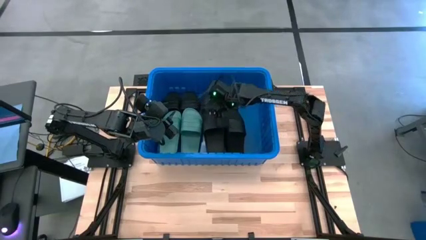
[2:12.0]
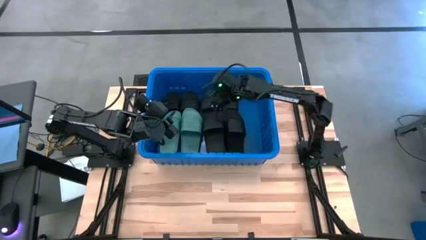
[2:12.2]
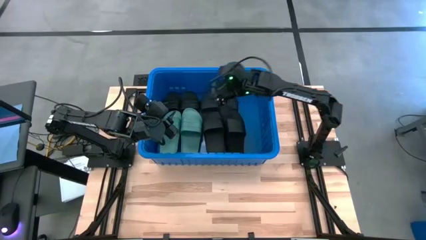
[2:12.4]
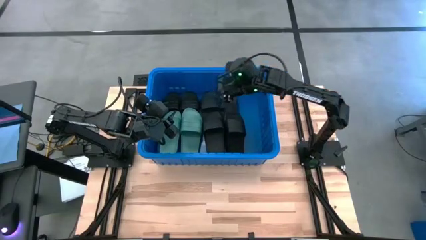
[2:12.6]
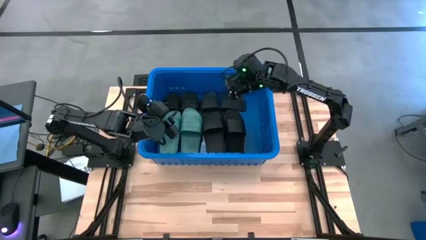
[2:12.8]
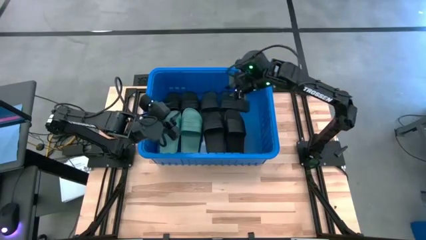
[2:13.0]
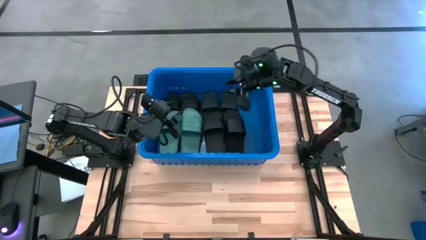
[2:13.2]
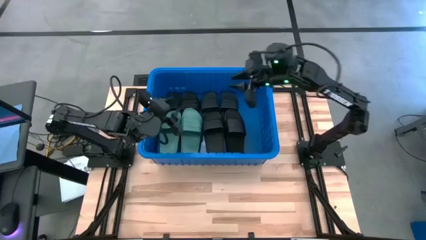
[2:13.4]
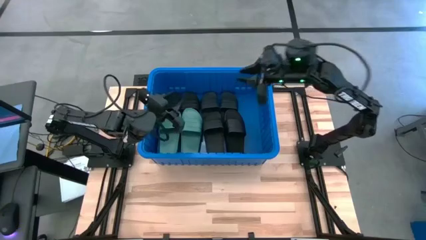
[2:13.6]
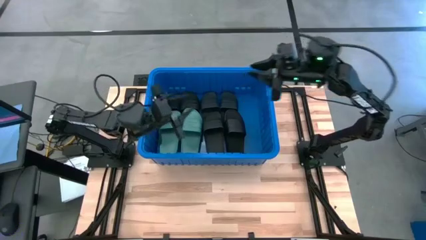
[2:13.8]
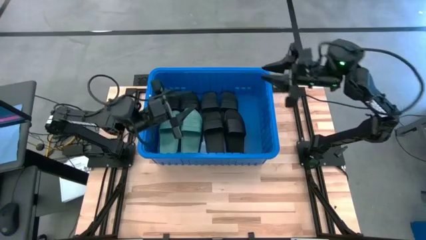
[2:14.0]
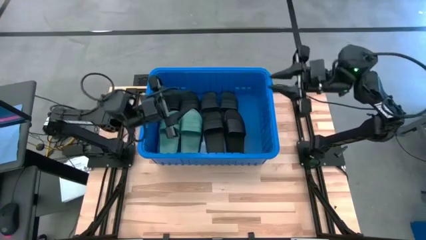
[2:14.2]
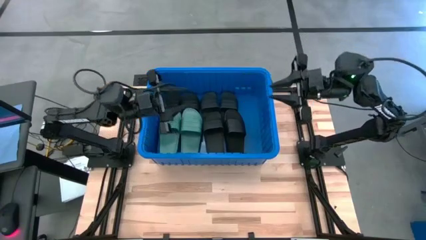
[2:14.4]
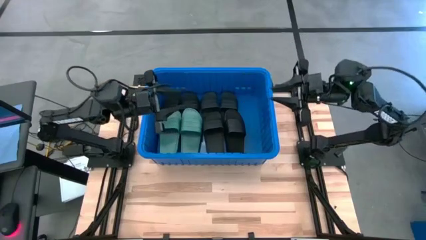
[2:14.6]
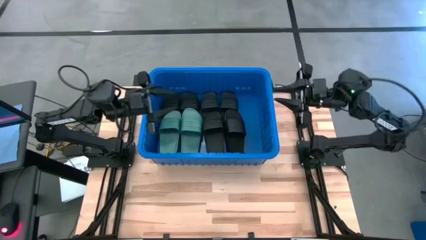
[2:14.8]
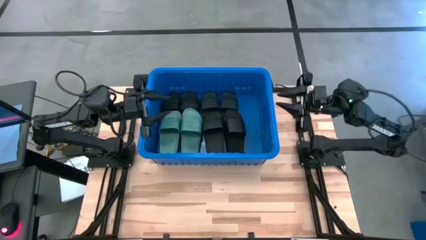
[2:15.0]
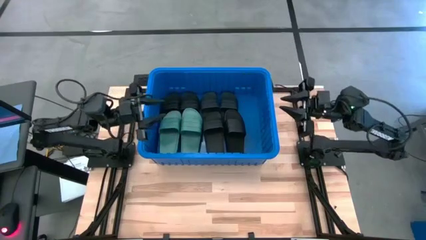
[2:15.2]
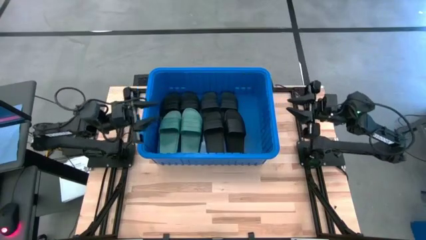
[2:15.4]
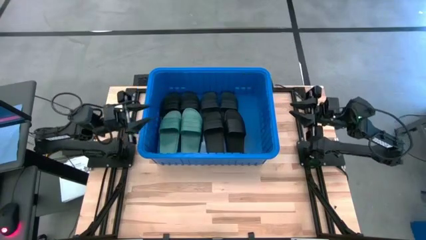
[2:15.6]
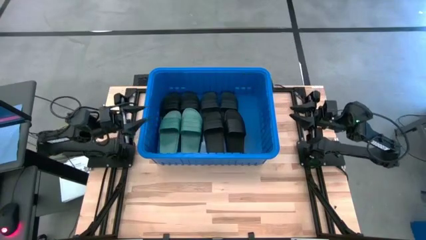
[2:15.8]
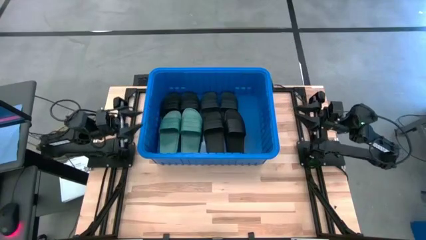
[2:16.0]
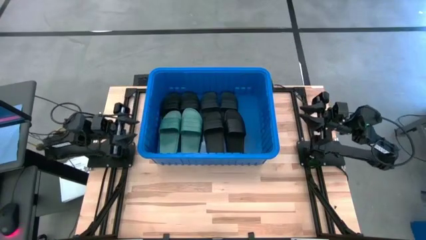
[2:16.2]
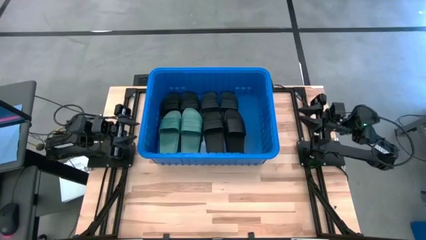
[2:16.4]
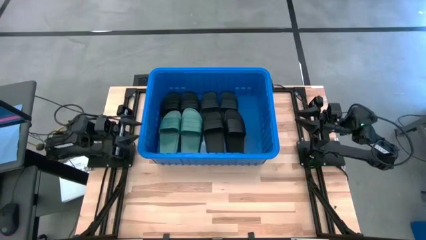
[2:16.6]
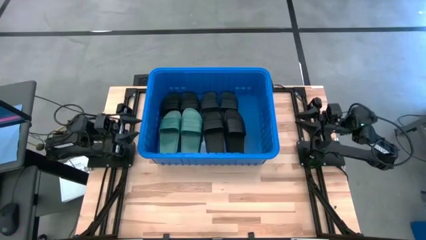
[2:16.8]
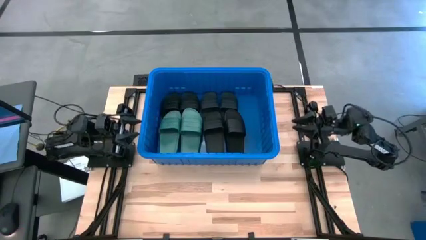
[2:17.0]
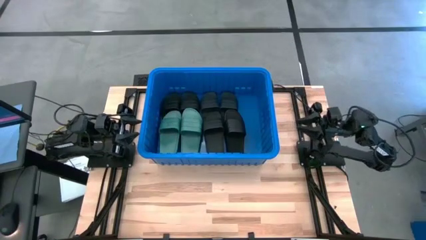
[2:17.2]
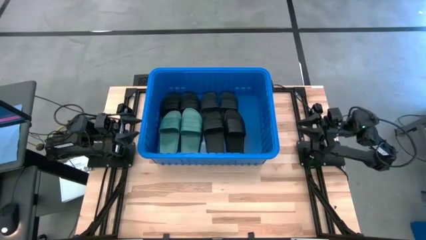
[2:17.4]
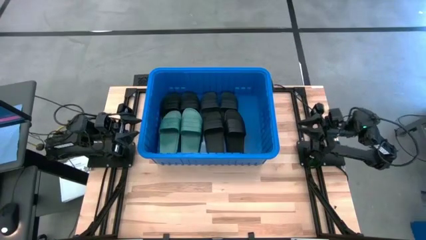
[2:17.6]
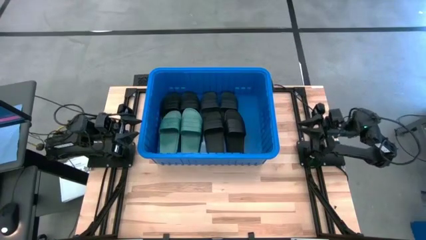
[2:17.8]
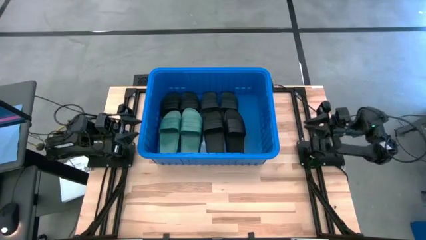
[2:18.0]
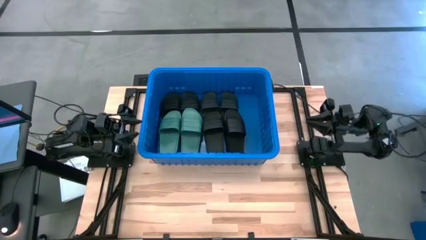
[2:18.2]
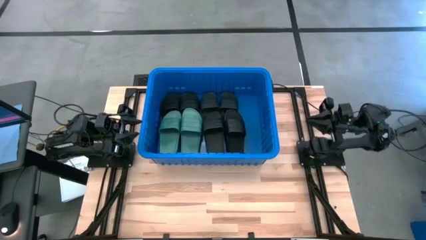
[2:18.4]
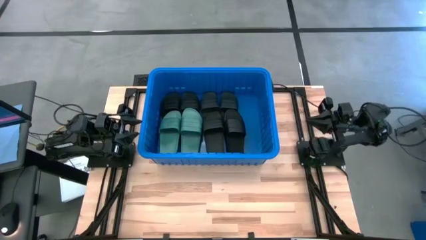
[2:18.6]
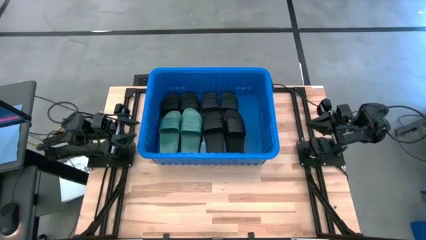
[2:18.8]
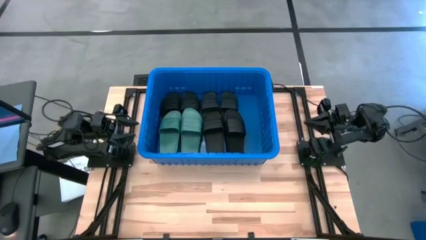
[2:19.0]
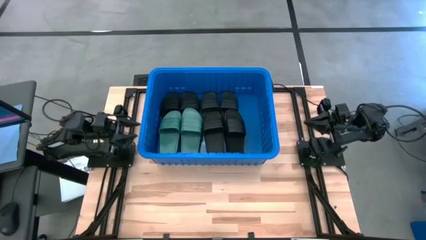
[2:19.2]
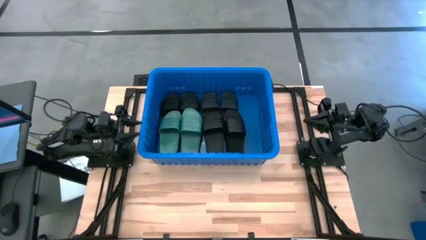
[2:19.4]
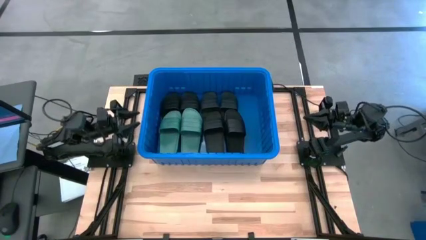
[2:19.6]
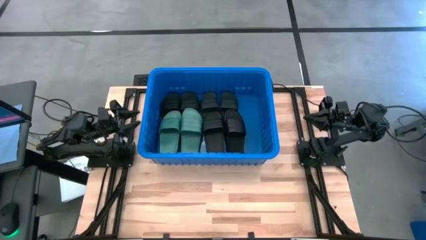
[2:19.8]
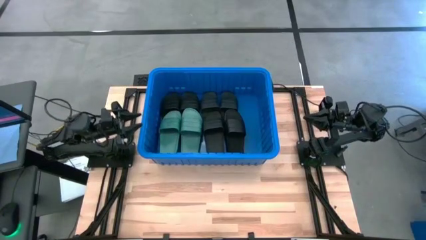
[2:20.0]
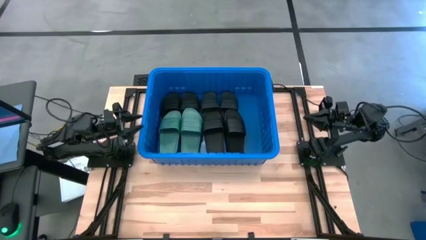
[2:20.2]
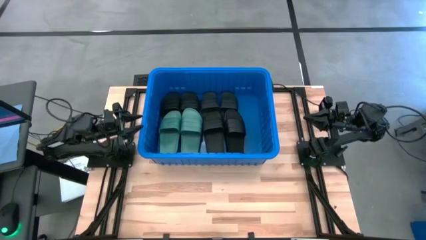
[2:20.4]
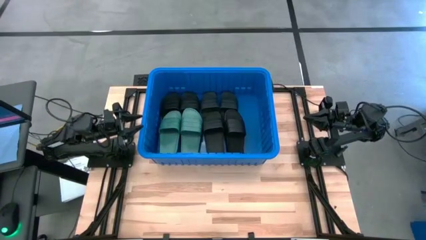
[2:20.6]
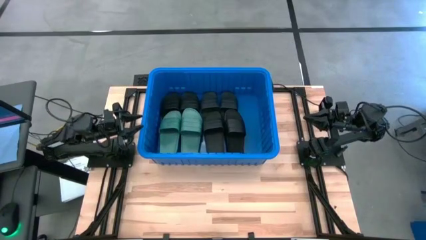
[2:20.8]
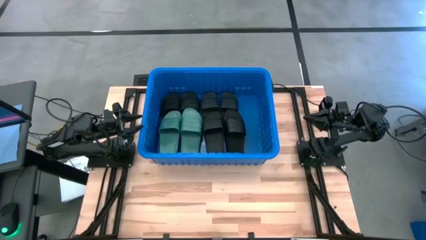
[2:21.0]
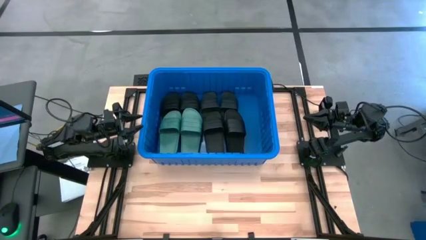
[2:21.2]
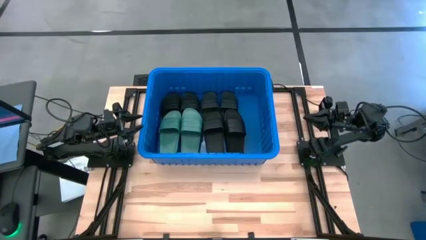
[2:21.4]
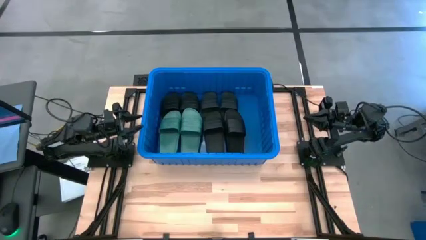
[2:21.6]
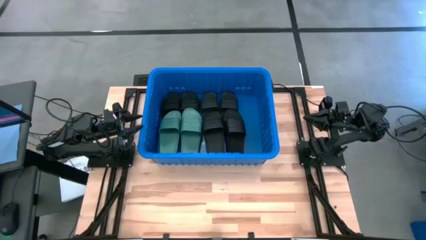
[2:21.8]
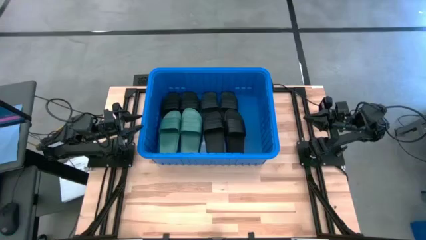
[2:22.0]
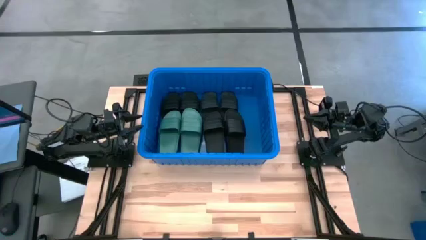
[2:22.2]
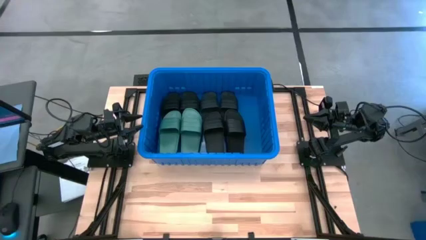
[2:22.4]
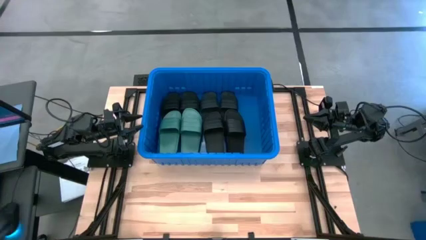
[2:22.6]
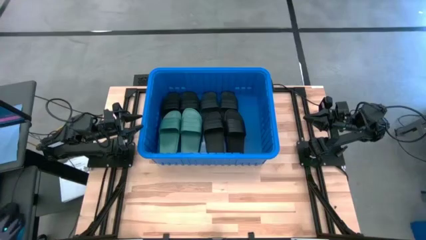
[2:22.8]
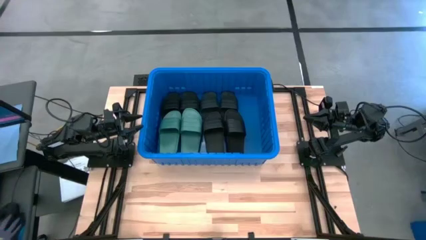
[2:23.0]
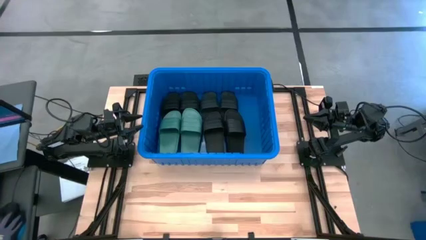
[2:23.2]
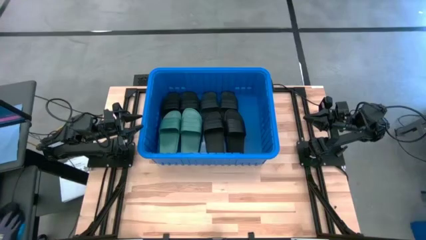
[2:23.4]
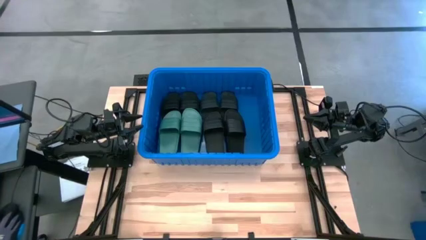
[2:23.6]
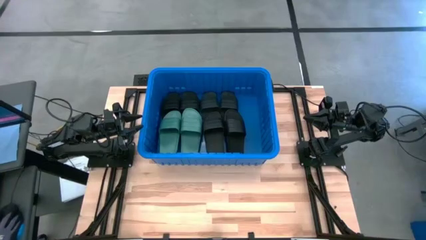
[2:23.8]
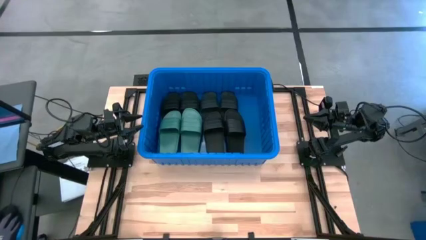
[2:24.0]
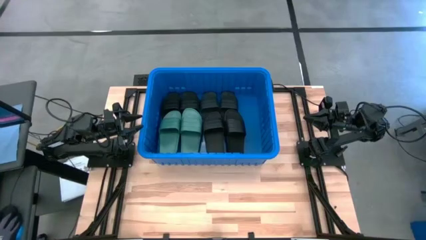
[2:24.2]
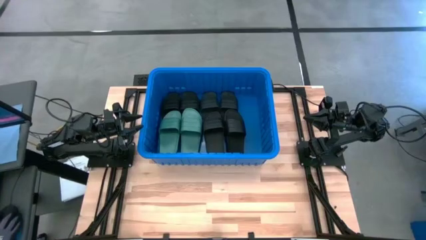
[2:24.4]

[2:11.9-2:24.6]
Task: Pick and place slides into bin
Return to Home Position

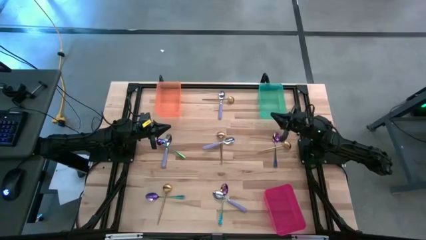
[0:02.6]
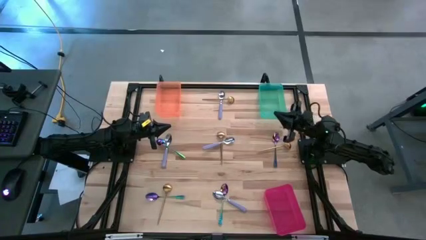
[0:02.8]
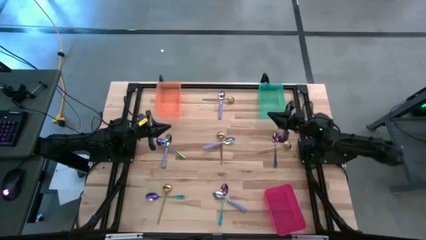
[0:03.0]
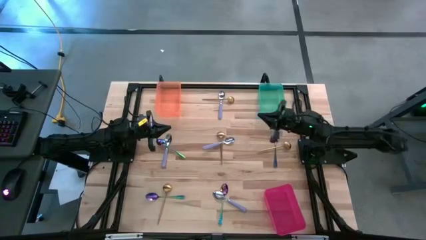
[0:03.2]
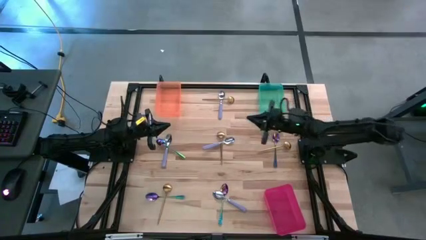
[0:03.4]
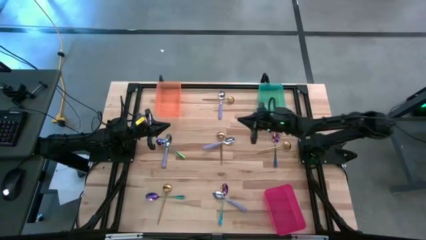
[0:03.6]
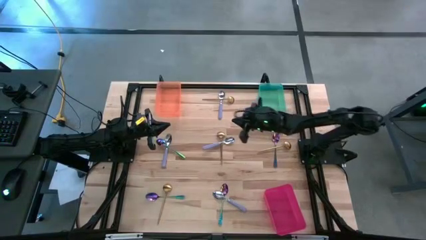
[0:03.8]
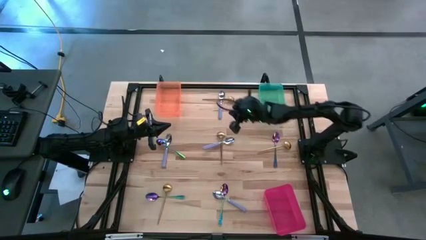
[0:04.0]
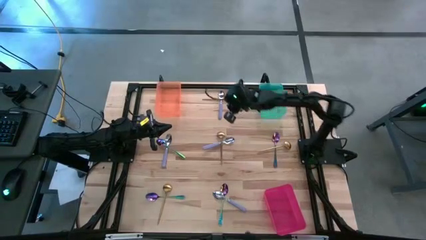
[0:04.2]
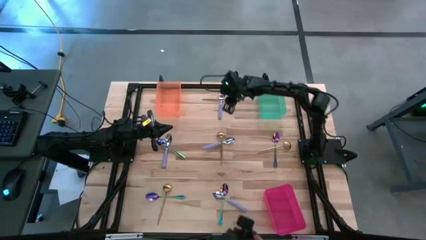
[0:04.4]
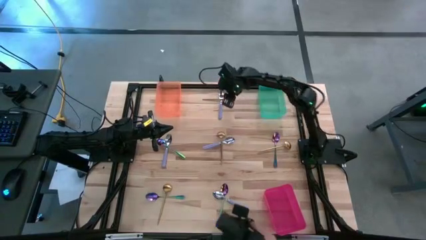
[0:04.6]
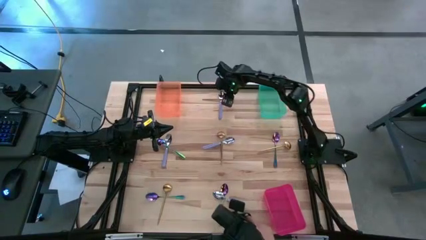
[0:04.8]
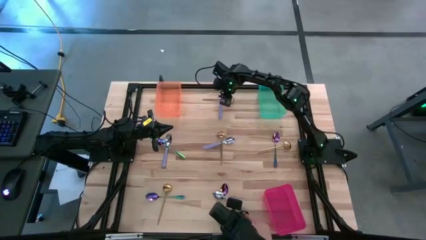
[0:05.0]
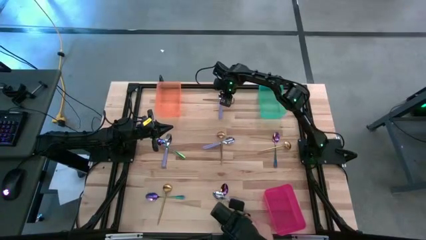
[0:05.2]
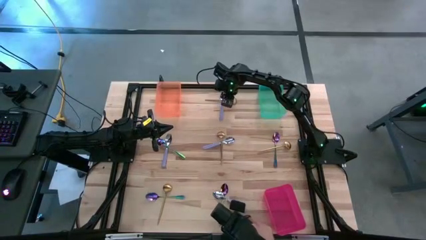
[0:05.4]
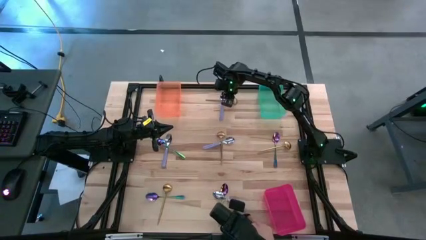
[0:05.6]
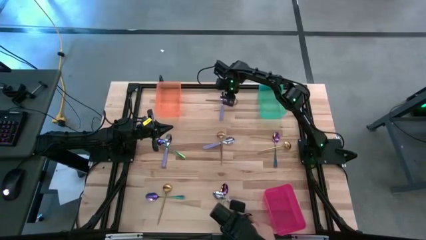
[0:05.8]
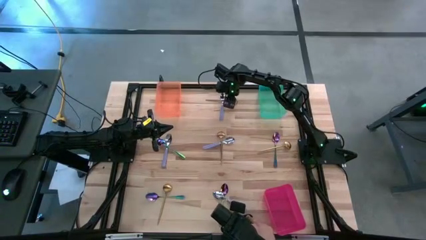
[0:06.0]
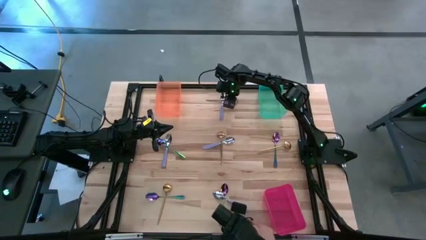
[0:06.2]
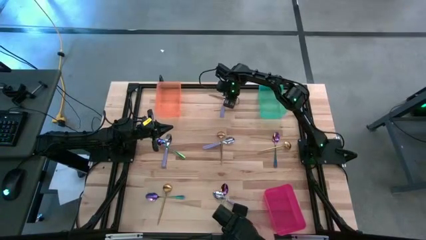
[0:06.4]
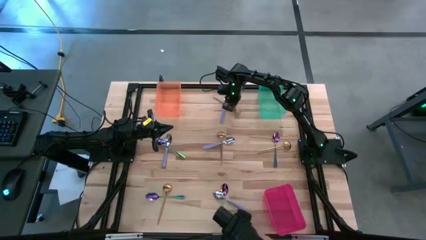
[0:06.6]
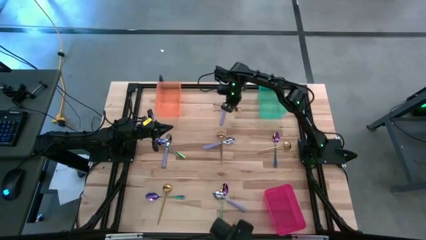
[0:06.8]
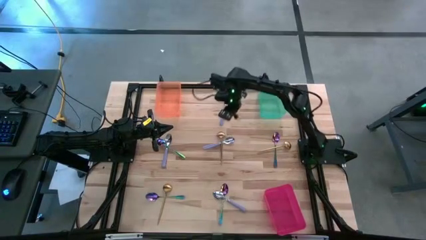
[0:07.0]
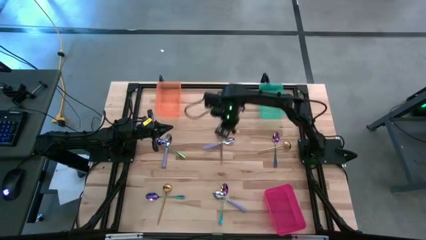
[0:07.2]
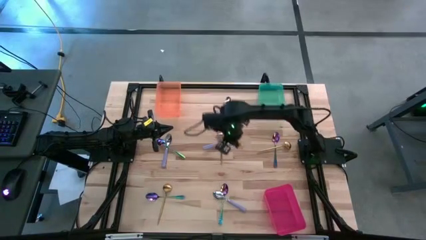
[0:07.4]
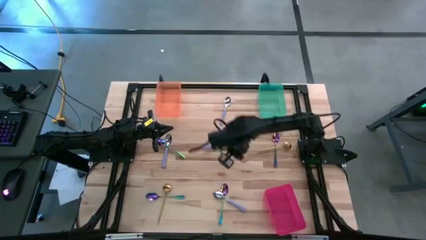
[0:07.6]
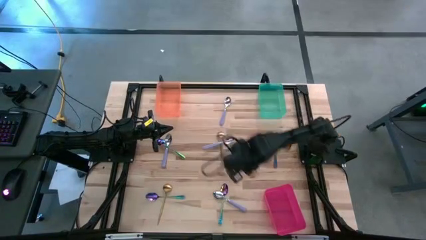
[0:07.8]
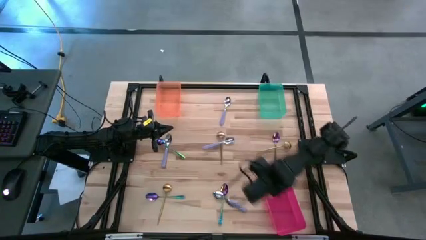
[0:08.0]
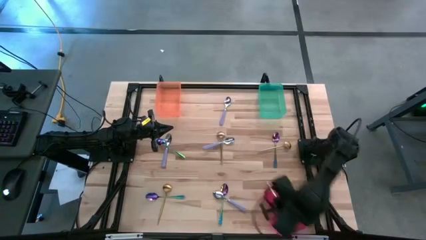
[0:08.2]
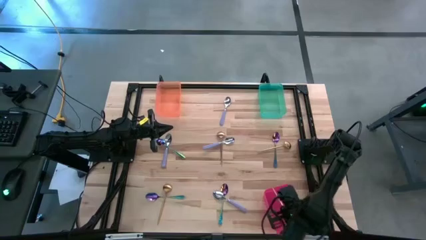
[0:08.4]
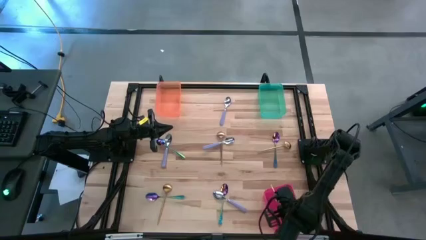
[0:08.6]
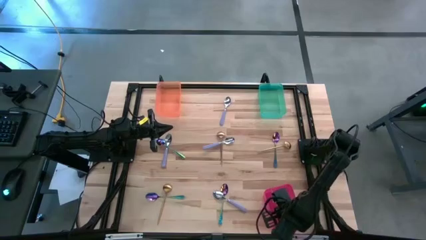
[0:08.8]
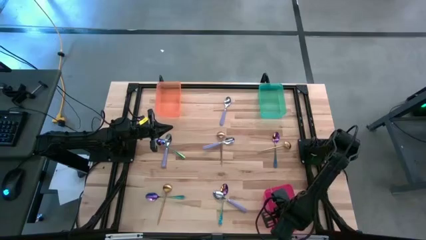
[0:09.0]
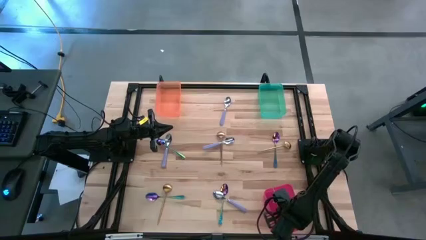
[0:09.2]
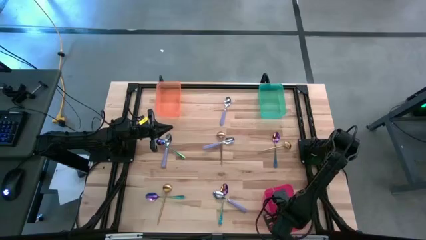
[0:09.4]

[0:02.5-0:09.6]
Task: Sort silverware by color (type)
Put the gold spoon into the pink bin
